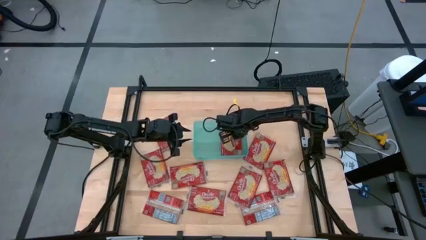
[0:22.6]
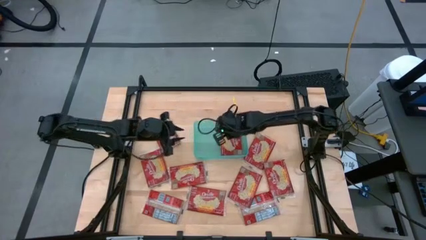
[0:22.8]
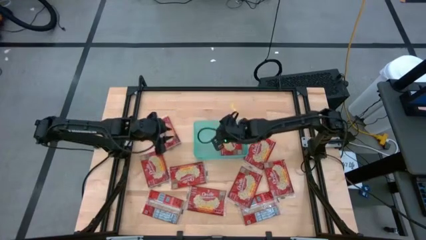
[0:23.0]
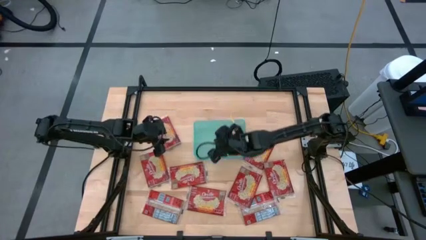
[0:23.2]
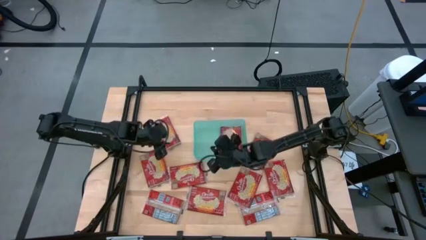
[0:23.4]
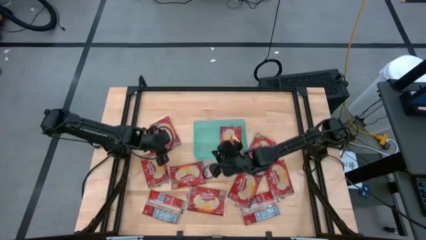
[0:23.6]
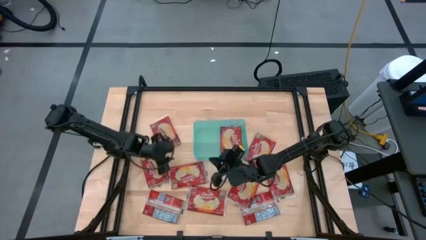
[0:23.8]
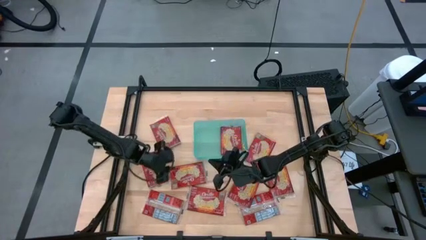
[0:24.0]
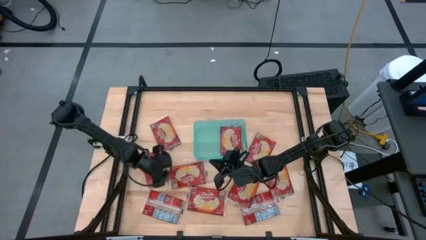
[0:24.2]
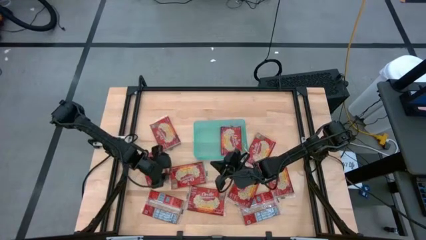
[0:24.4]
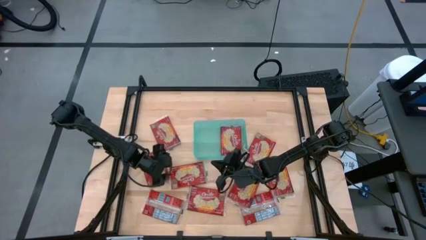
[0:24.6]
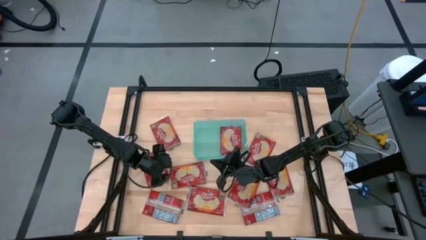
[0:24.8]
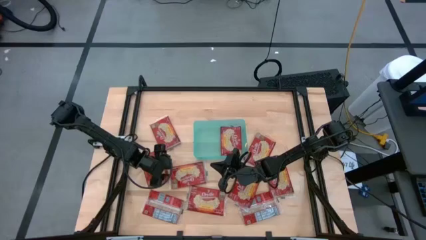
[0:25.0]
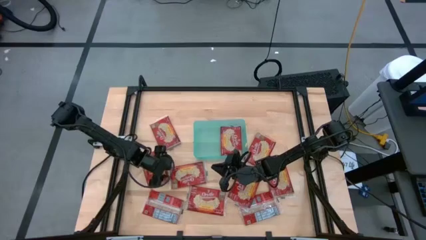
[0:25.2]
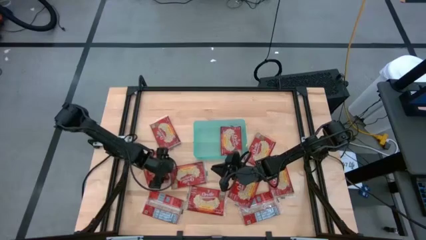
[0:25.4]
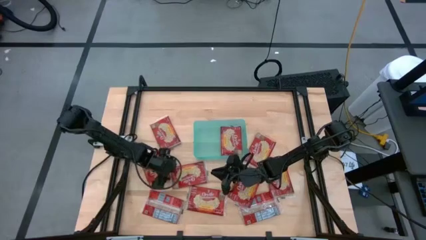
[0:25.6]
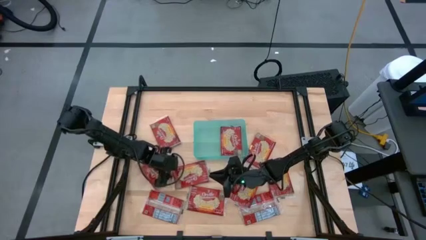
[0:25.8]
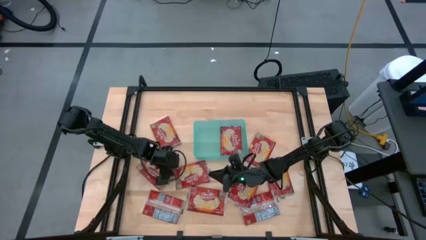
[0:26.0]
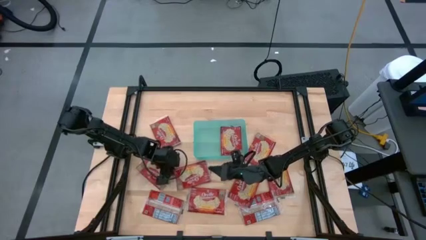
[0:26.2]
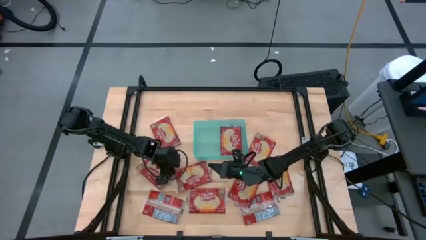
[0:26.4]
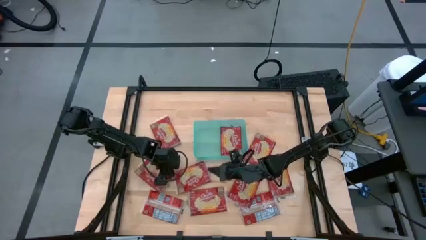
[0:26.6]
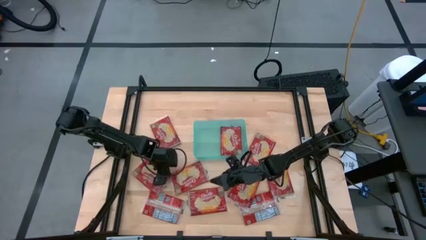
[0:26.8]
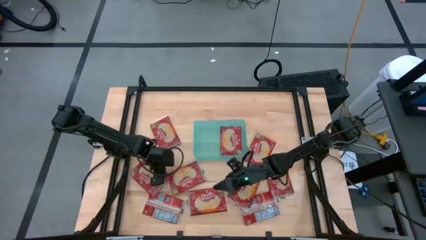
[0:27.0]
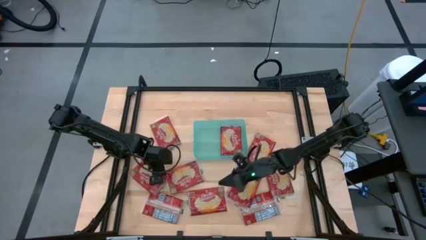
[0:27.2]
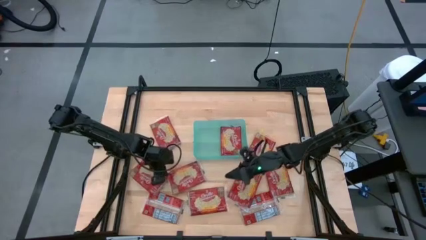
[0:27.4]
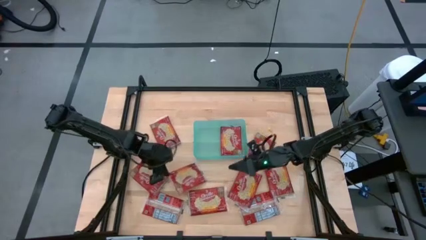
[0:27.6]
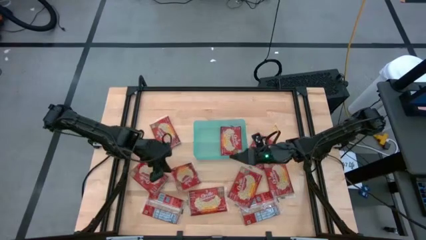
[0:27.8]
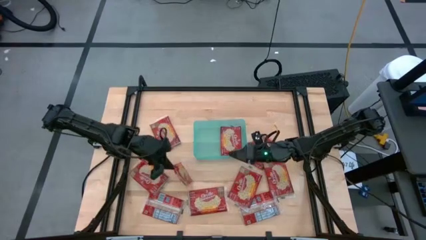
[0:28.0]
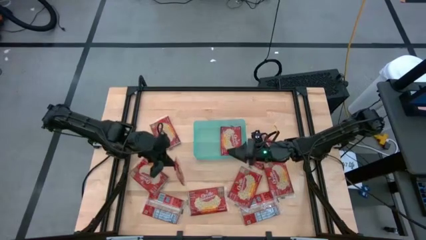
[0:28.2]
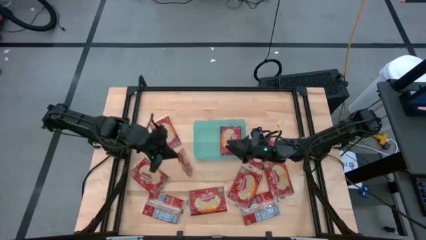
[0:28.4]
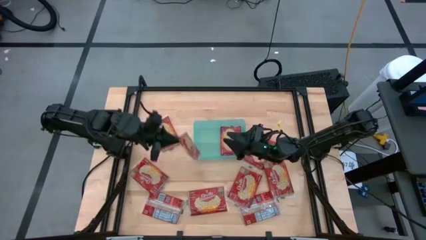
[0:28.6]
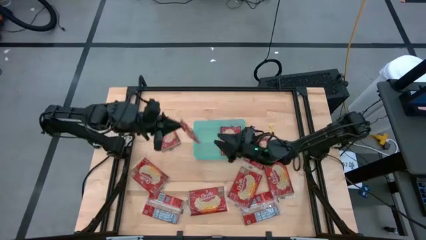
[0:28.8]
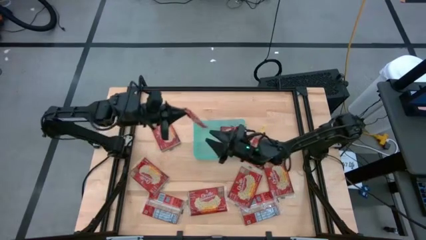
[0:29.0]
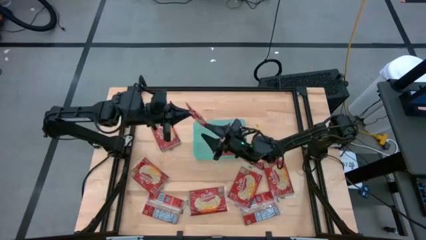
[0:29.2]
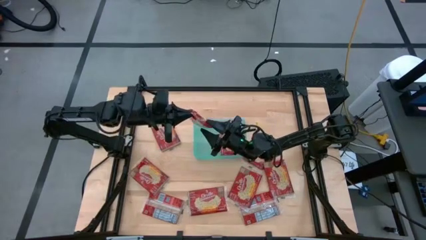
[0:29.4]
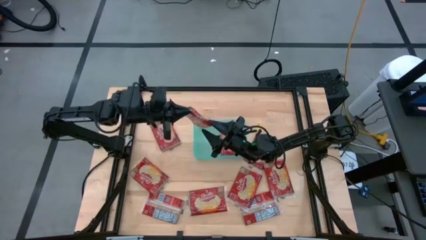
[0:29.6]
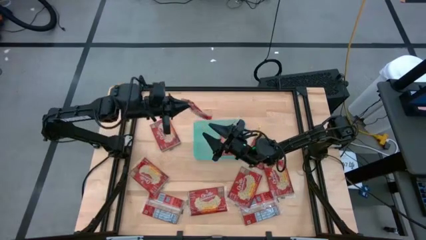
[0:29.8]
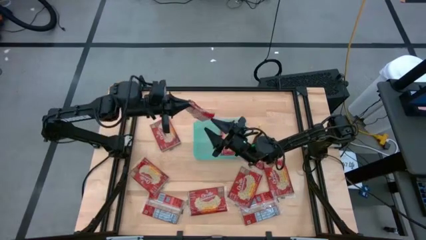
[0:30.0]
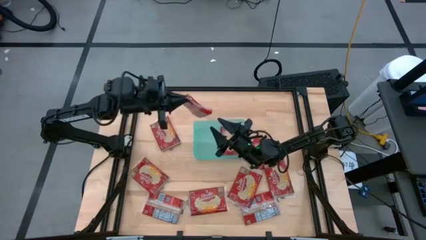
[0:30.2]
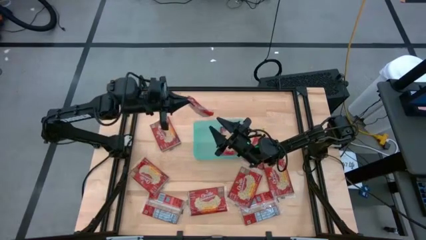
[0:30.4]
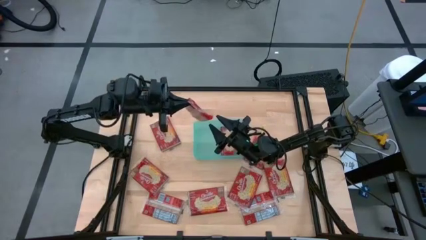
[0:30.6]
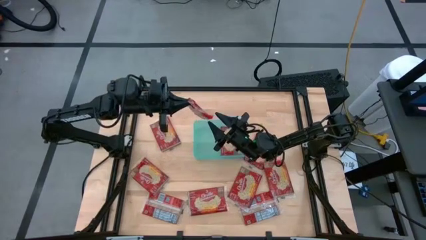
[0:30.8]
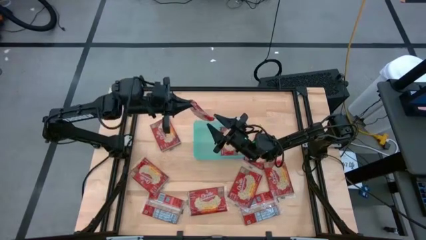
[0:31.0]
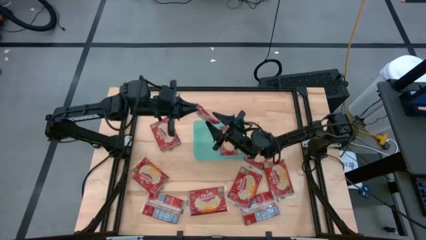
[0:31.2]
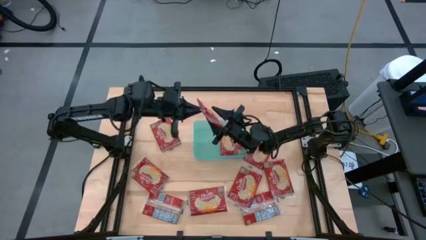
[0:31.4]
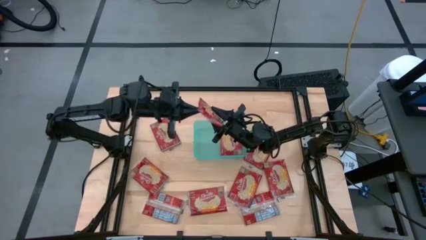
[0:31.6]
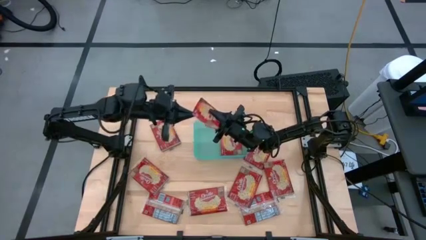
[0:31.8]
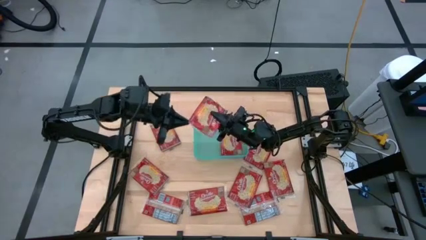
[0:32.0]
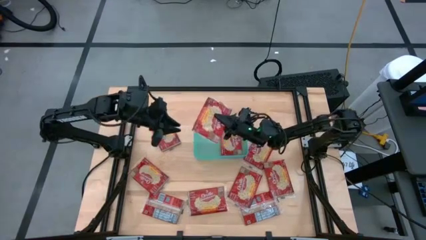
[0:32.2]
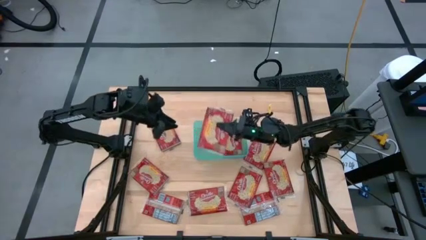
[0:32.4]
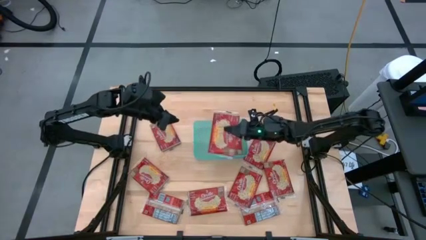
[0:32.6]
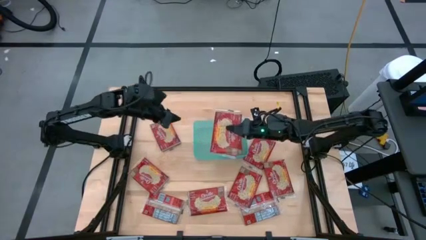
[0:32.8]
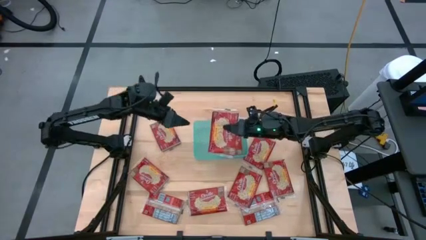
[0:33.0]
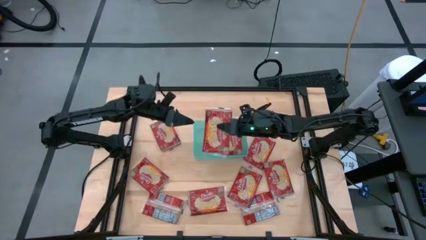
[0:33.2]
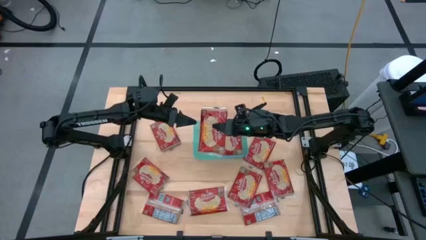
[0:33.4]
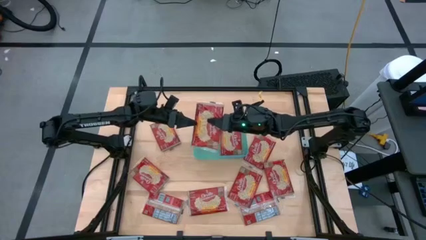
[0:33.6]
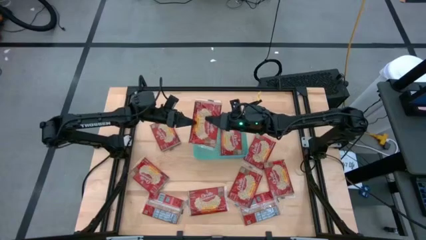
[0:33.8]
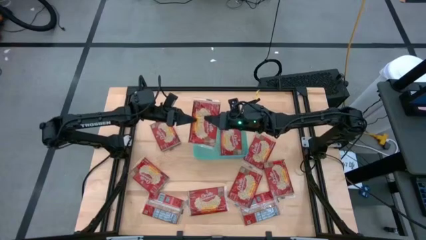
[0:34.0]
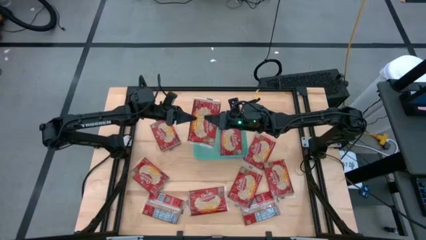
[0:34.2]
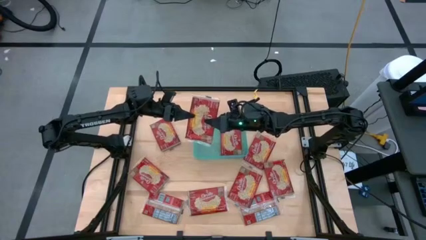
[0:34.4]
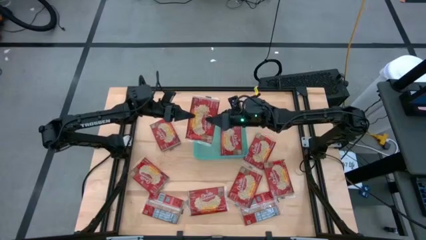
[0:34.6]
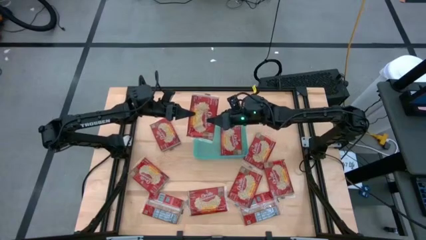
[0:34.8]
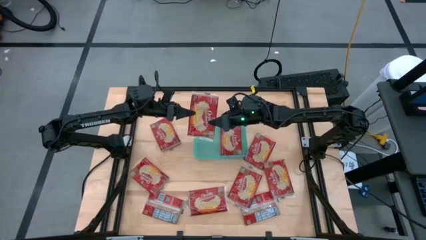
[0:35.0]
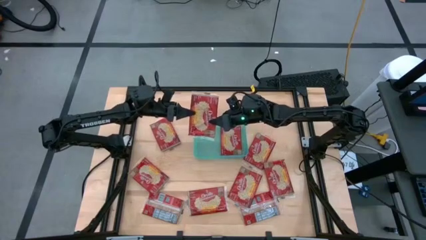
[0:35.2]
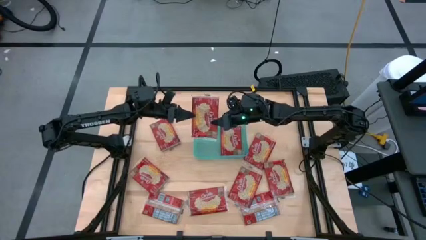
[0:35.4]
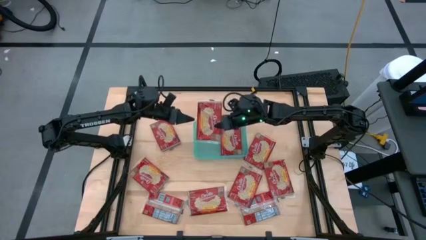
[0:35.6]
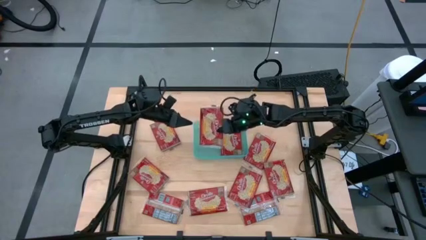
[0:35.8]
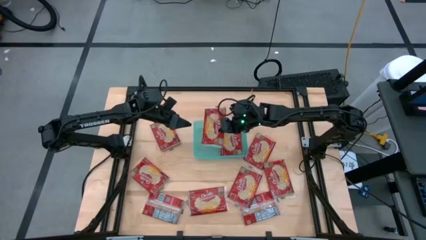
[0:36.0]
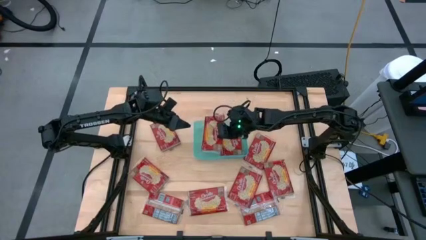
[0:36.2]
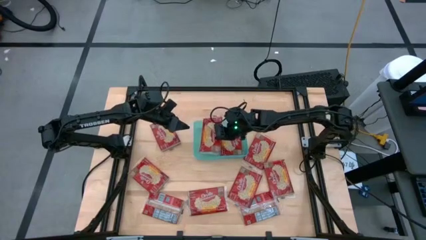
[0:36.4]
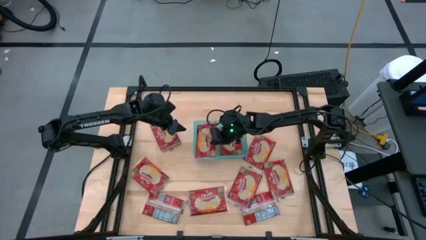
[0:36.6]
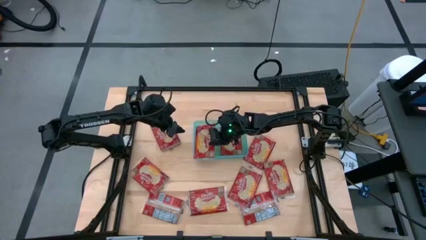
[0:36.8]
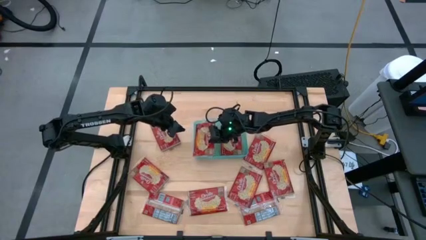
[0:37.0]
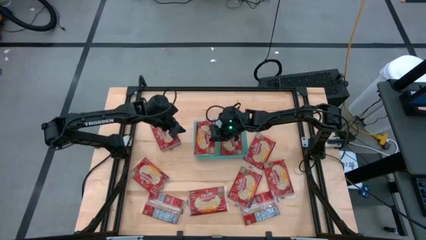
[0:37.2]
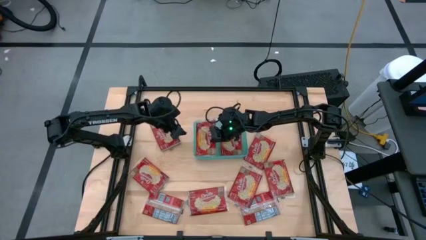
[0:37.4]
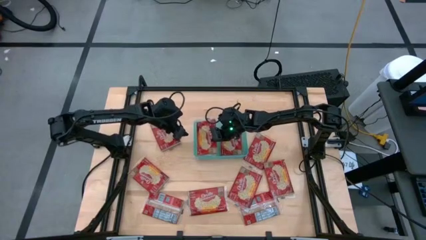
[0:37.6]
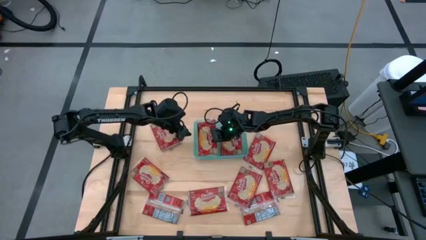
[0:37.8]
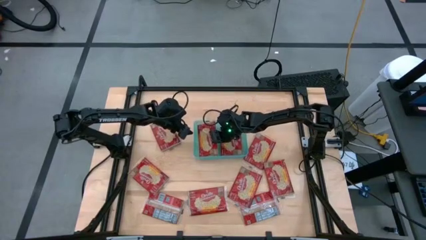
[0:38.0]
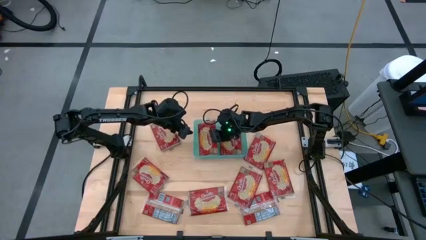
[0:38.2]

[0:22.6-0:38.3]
Task: Sort popcorn bags into baskets
Put the red popcorn bag into the green bin
